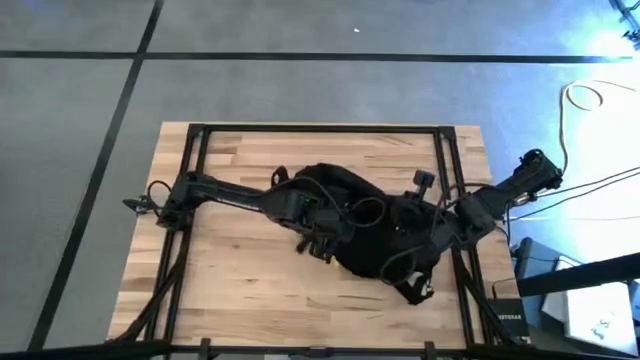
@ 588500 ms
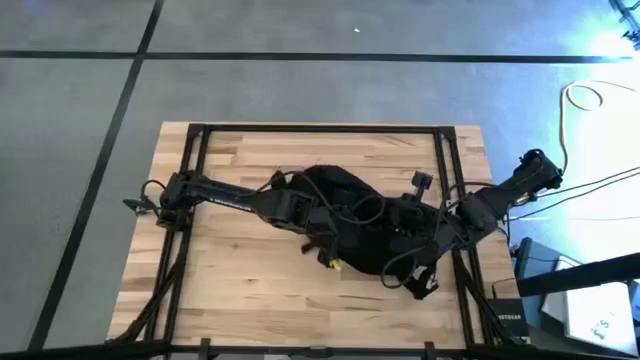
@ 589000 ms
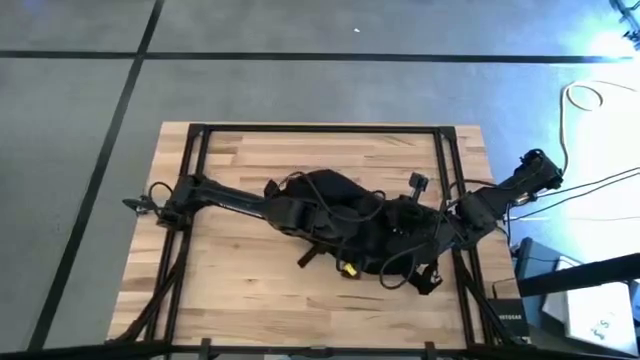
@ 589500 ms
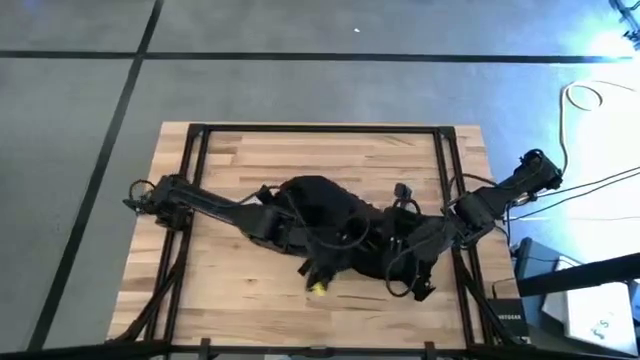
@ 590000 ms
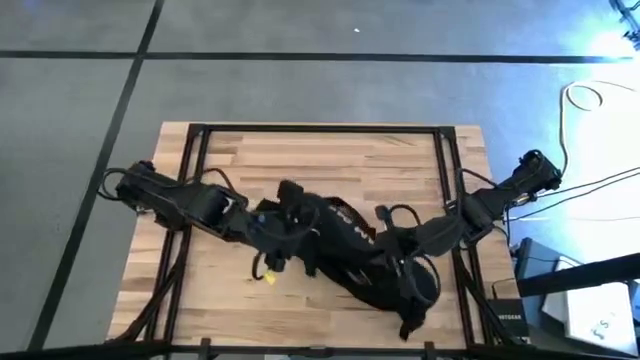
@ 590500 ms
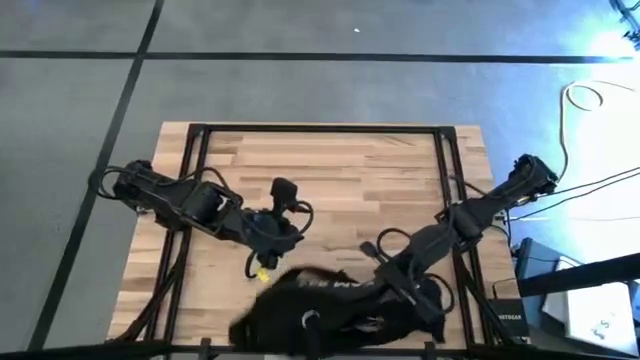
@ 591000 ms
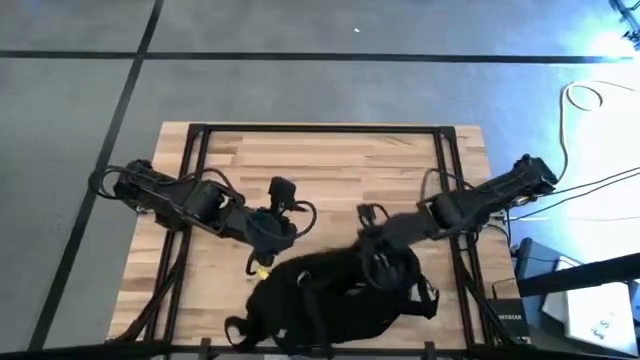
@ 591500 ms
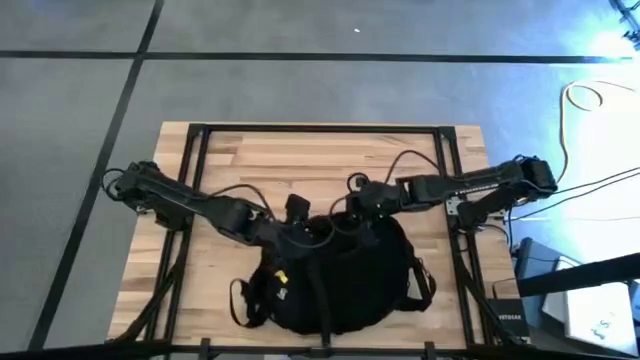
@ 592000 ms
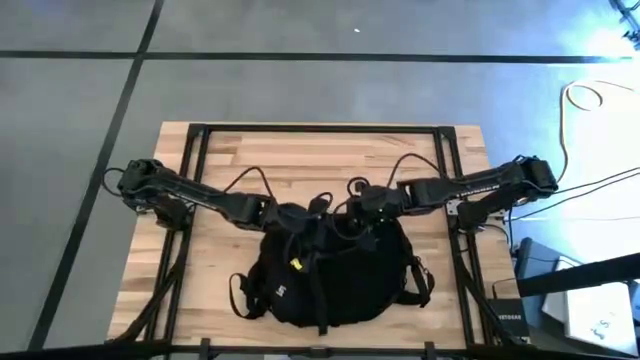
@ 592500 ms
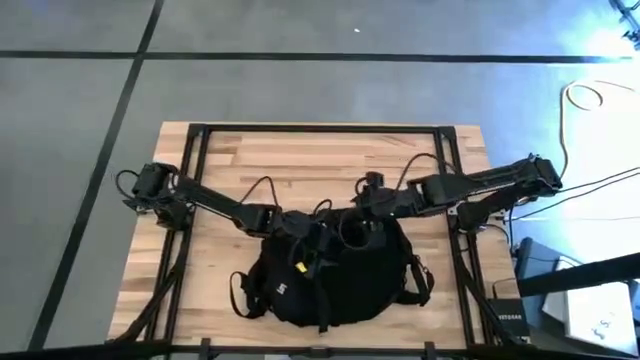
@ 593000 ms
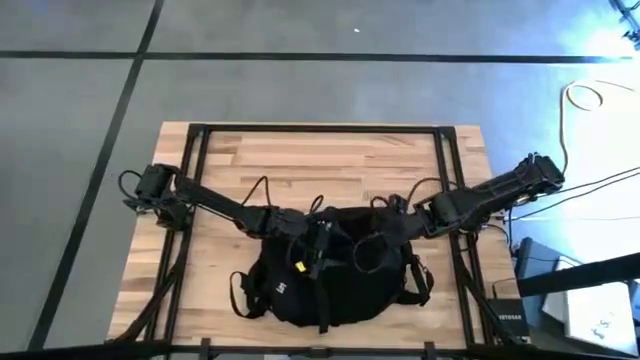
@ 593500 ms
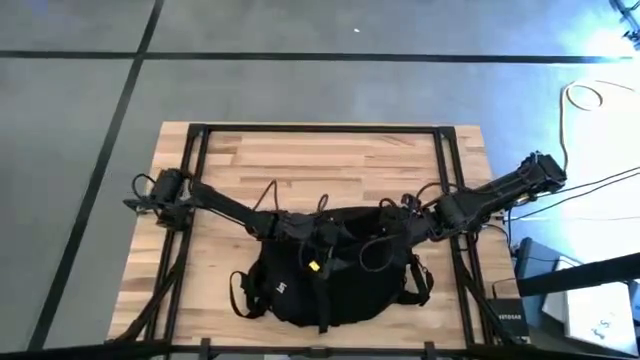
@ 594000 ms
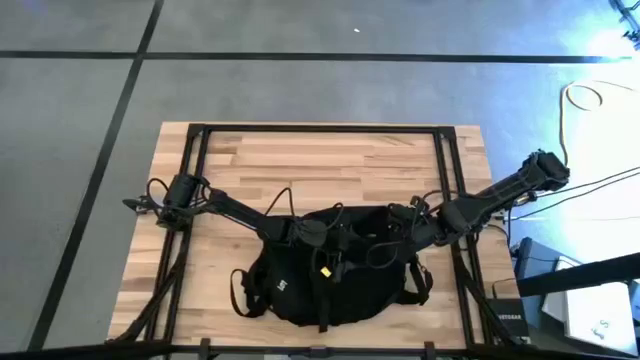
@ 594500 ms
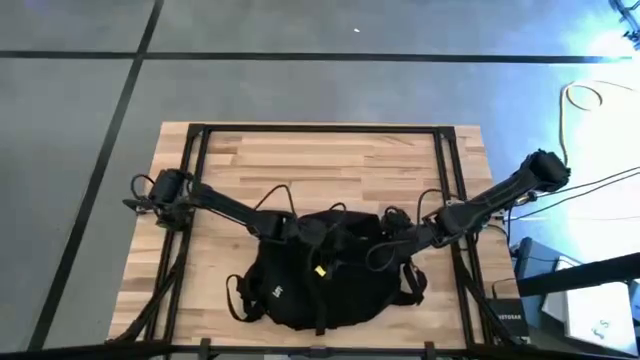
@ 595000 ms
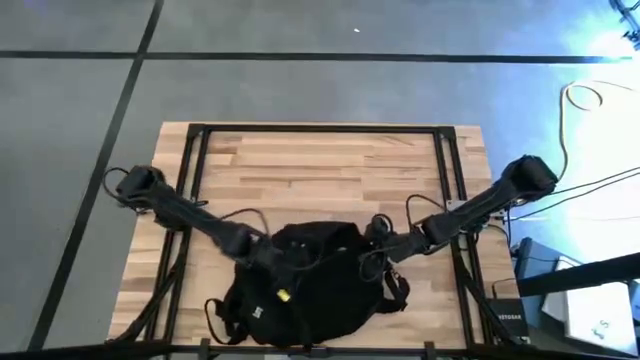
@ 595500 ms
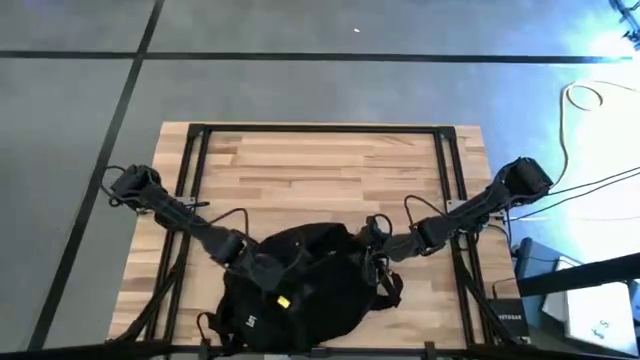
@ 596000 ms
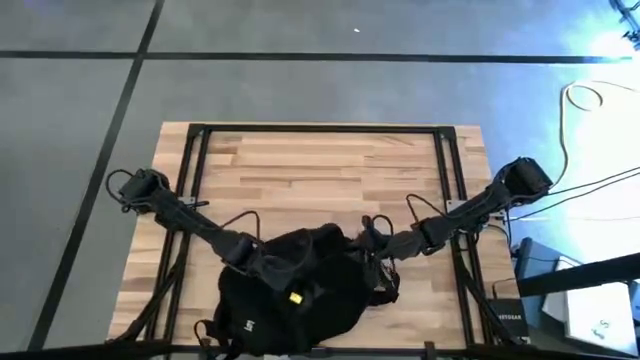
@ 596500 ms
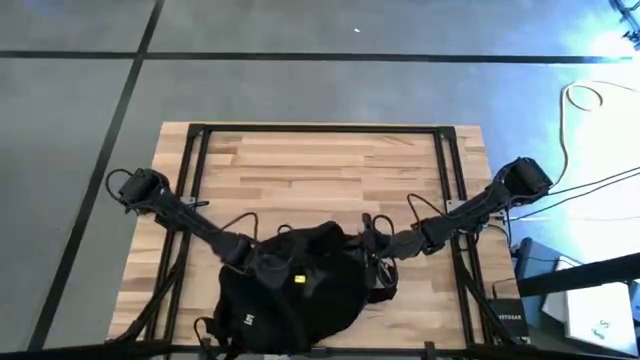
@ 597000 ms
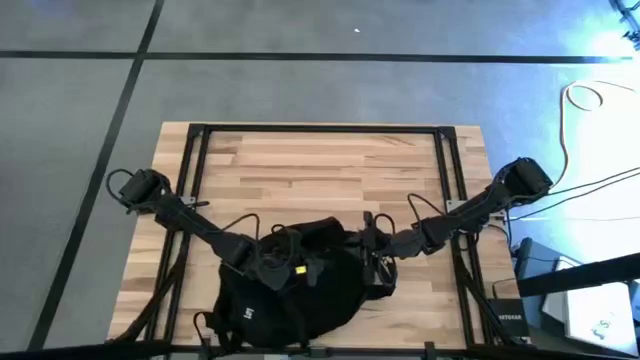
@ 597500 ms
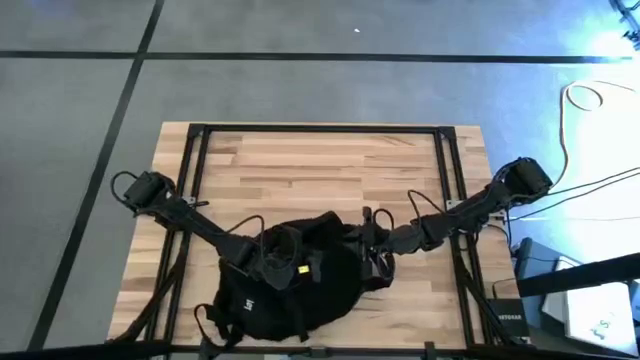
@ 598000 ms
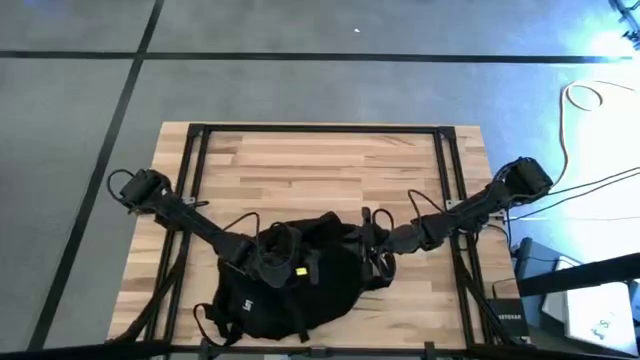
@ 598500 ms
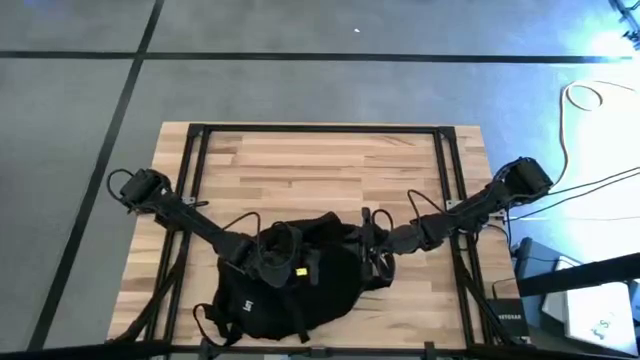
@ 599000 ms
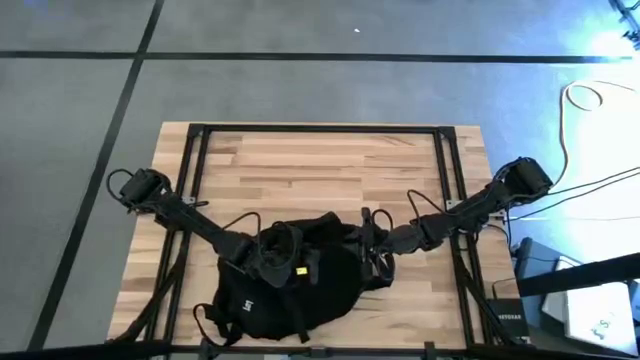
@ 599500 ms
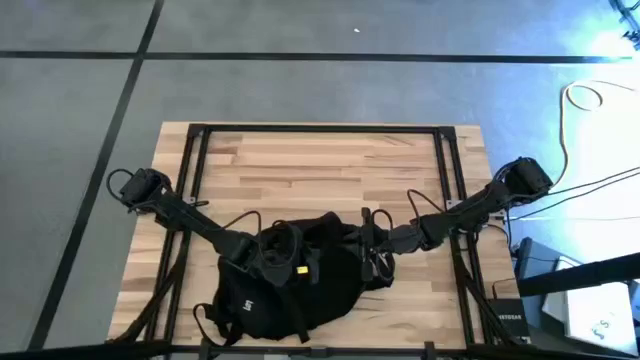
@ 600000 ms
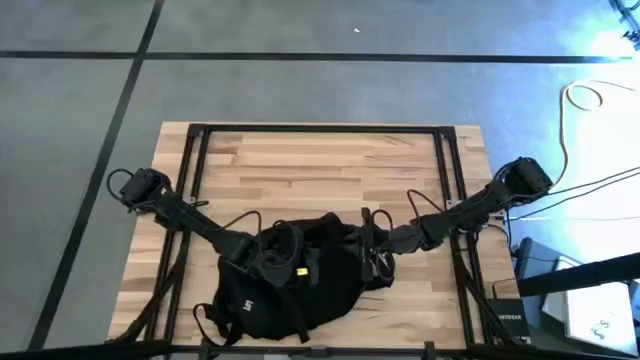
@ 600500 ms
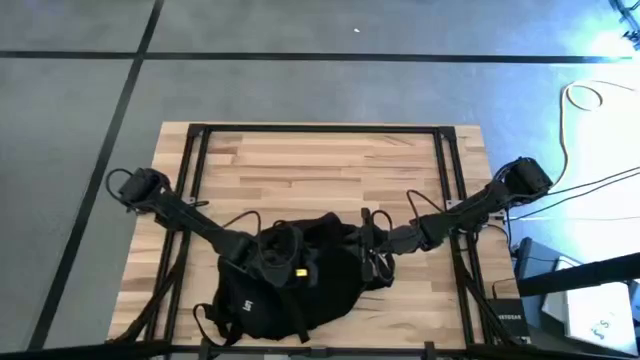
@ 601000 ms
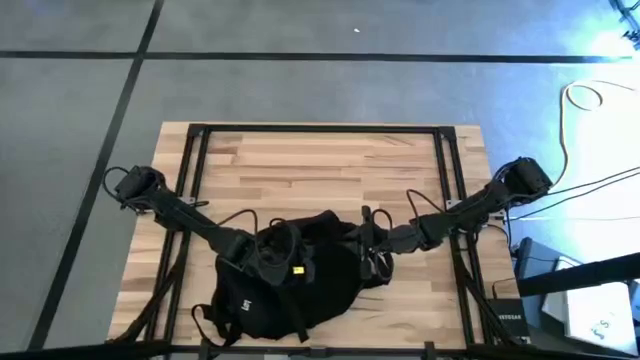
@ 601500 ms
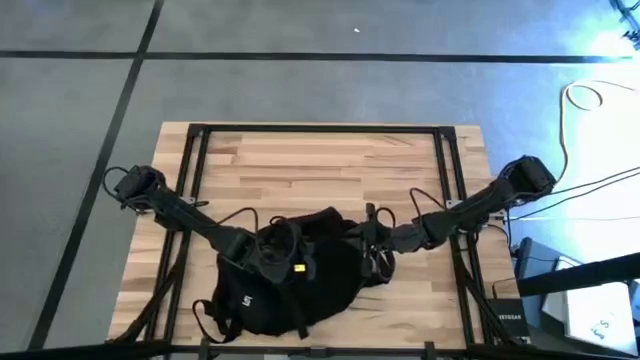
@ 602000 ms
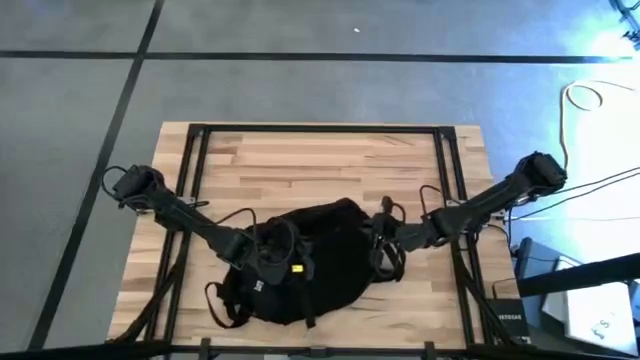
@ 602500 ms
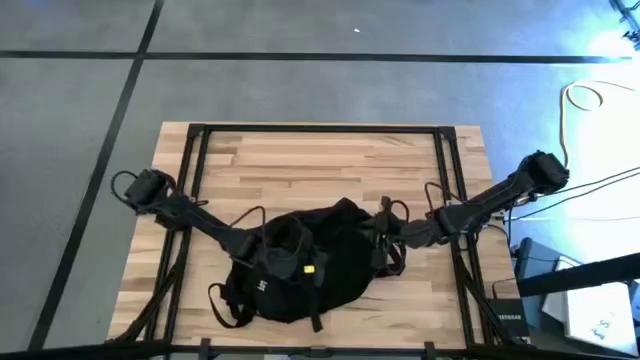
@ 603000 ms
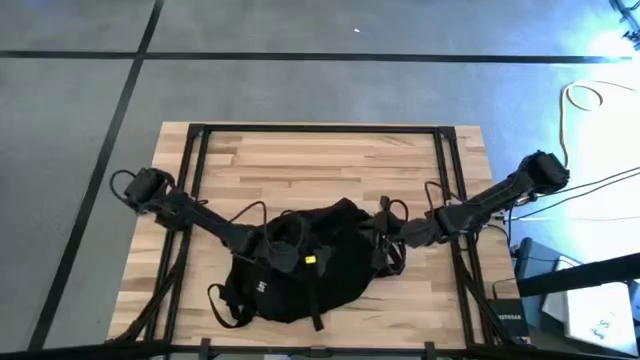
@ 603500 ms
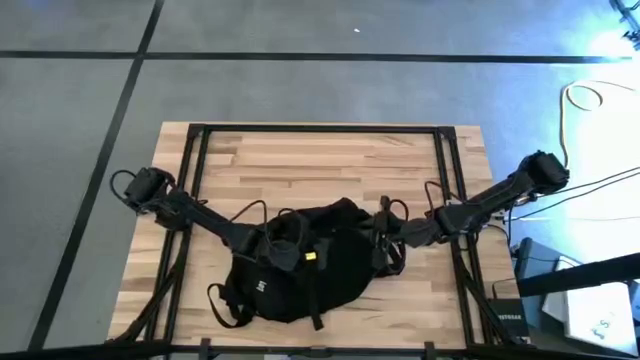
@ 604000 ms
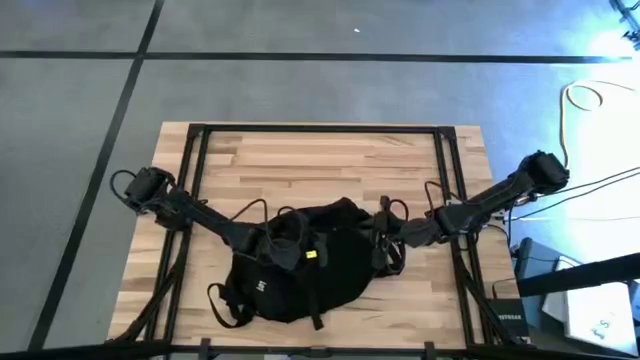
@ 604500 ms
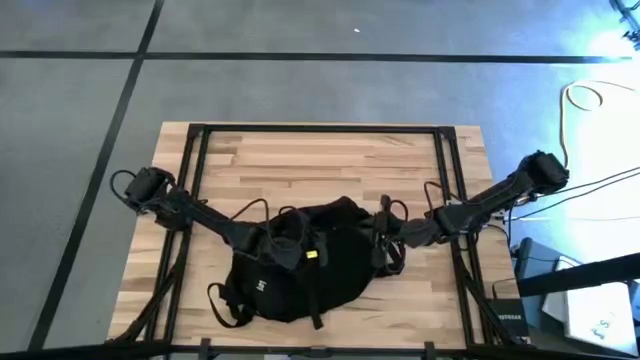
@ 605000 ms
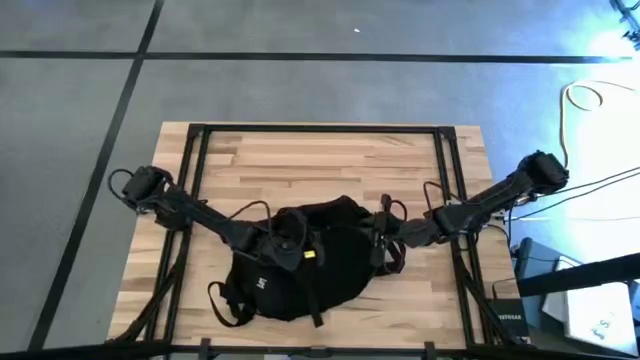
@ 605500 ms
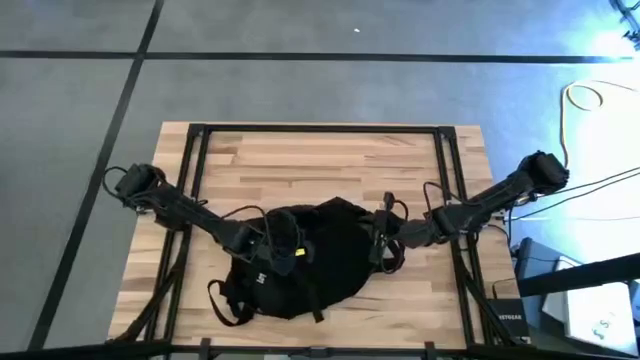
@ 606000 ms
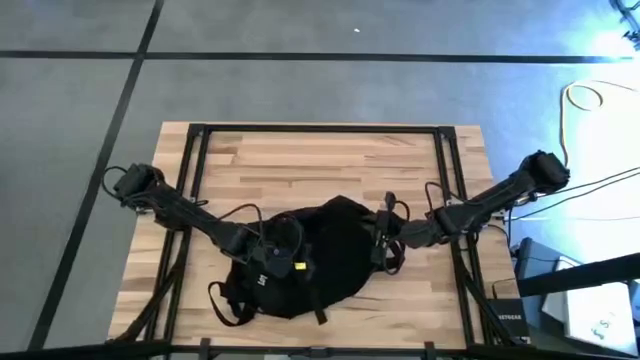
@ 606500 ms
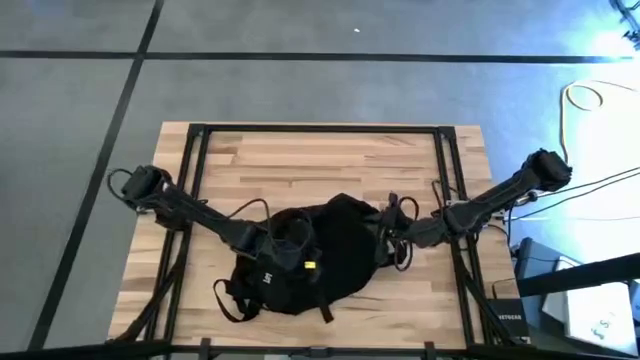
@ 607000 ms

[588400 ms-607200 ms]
Task: Unpack backpack
Close the black backpack

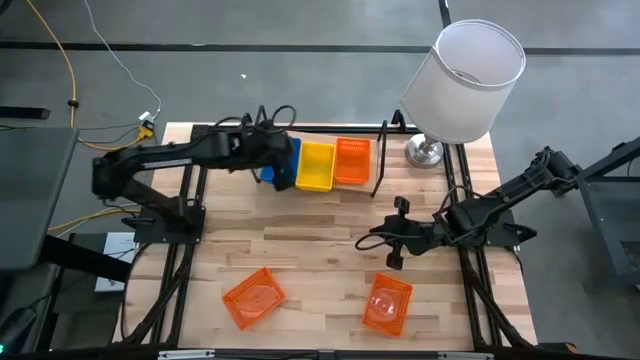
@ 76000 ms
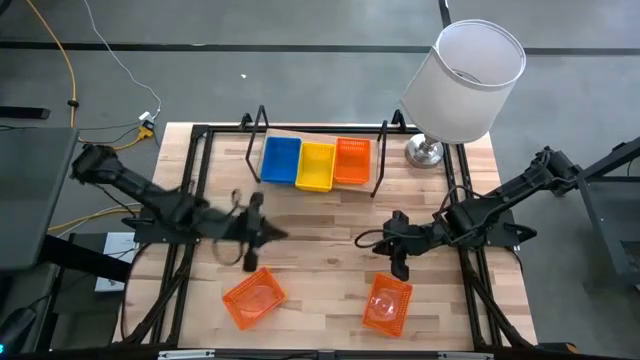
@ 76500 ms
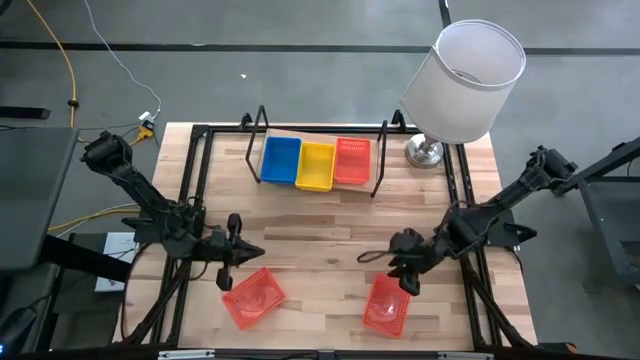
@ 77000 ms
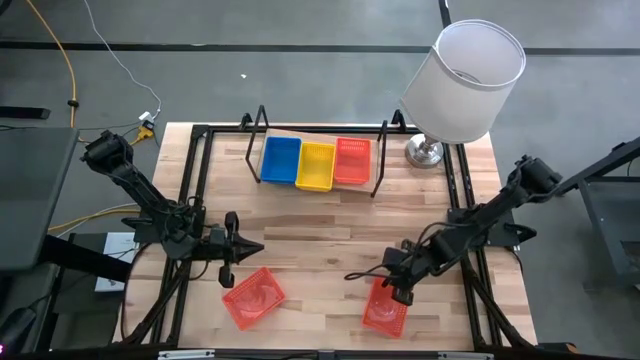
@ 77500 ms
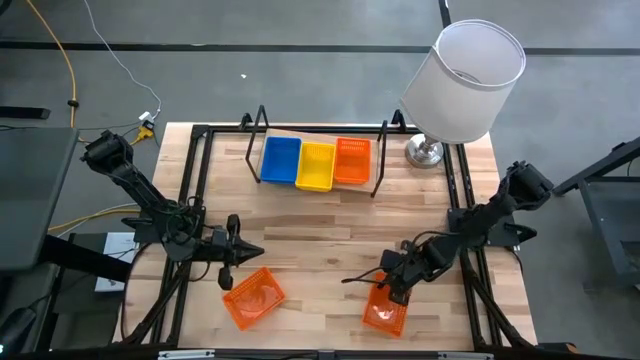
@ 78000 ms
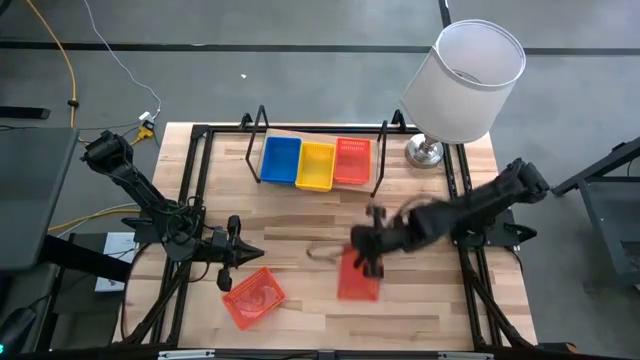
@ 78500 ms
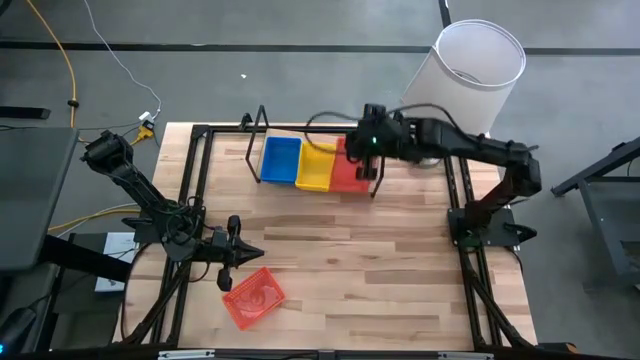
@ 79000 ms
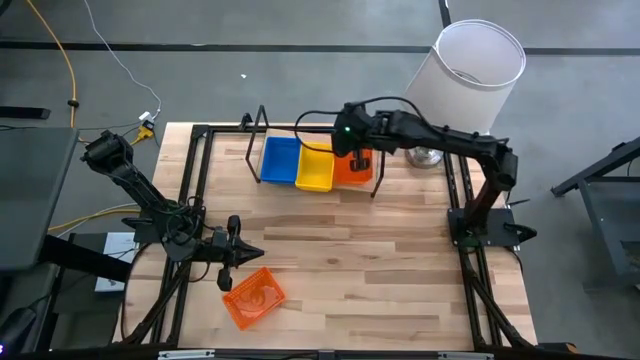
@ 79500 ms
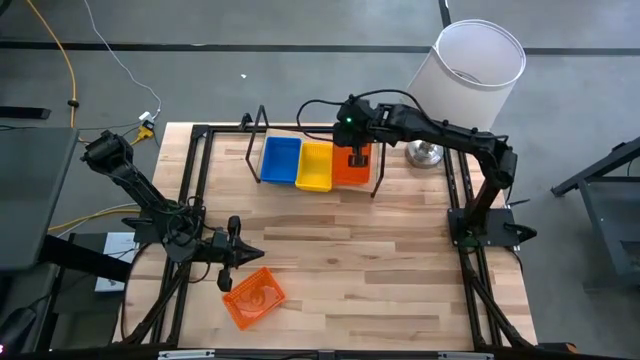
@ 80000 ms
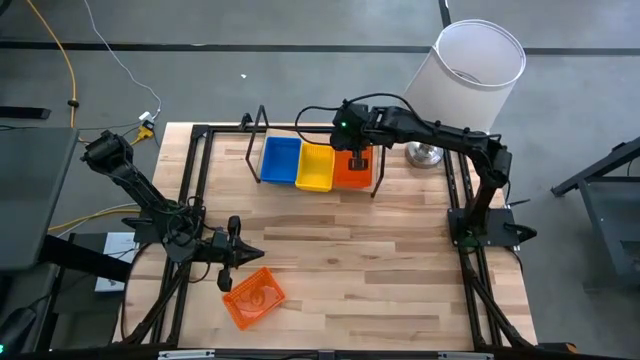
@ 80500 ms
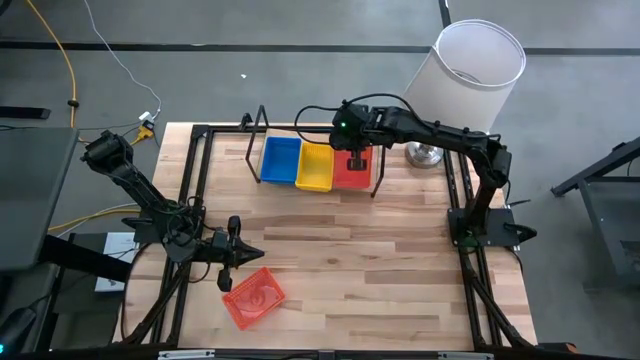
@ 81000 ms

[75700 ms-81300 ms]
Task: Stack baskets on shelf by color
Stack the right orange bin on the orange bin on the shelf
